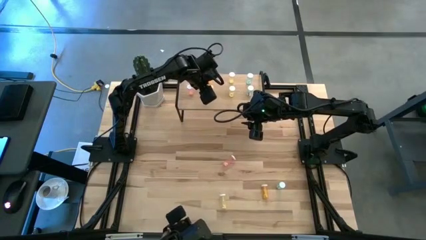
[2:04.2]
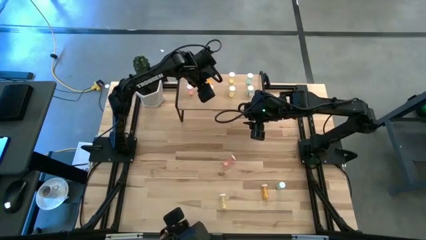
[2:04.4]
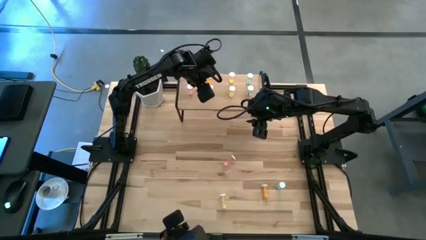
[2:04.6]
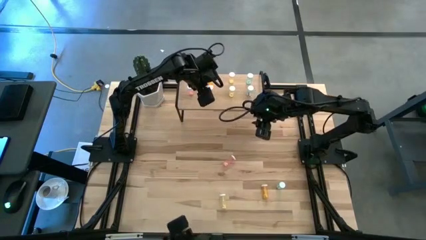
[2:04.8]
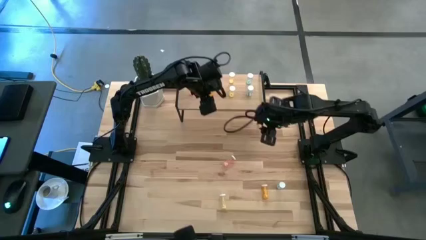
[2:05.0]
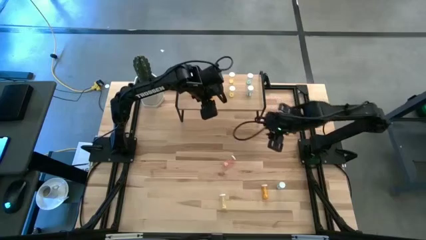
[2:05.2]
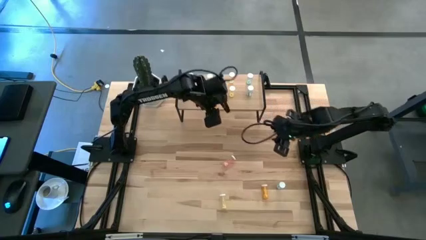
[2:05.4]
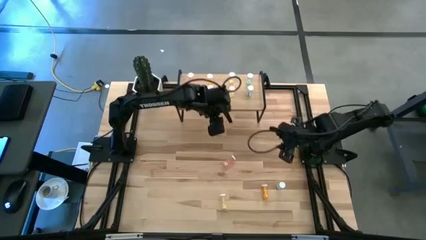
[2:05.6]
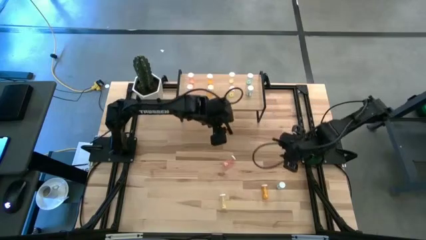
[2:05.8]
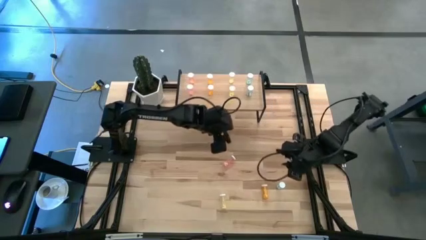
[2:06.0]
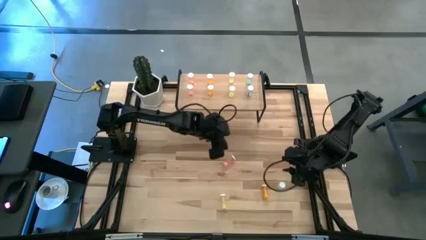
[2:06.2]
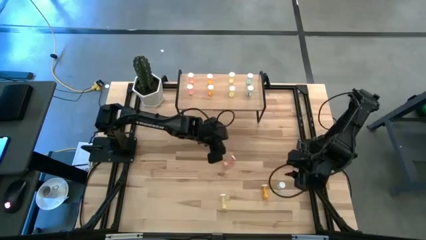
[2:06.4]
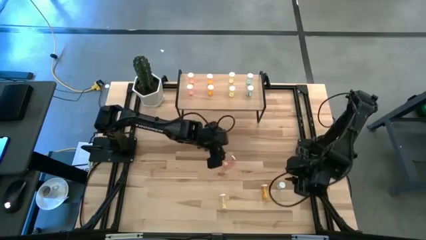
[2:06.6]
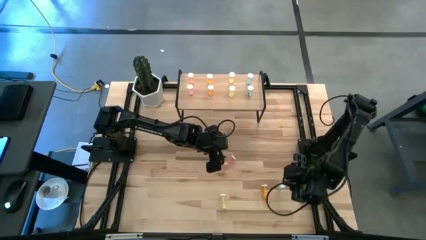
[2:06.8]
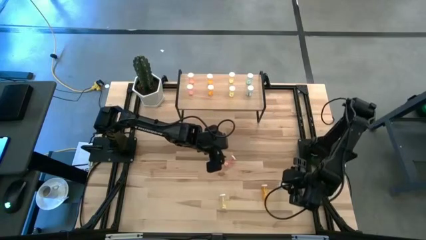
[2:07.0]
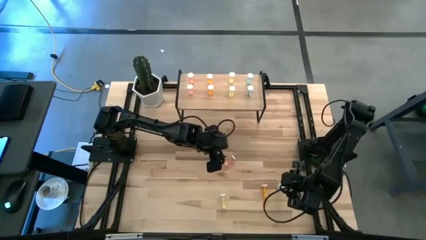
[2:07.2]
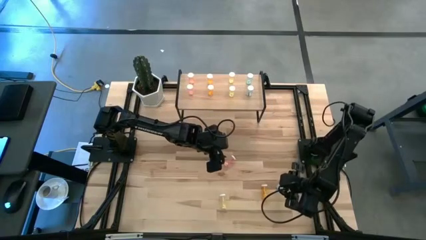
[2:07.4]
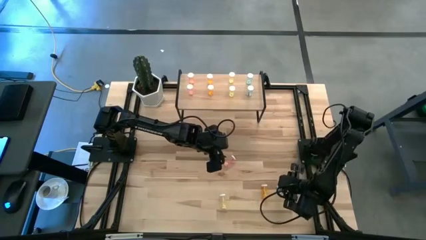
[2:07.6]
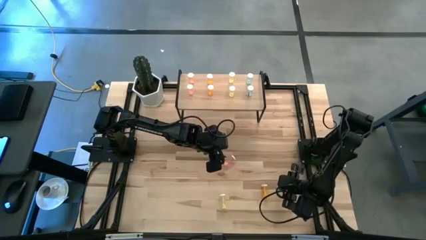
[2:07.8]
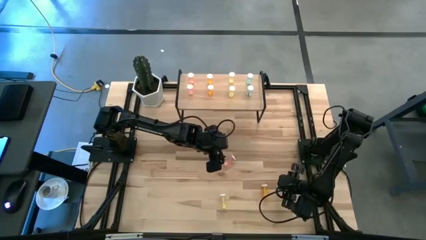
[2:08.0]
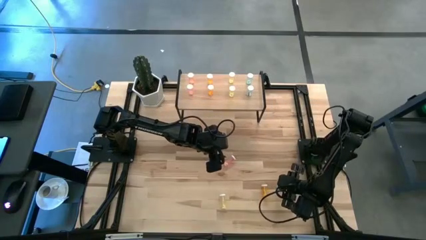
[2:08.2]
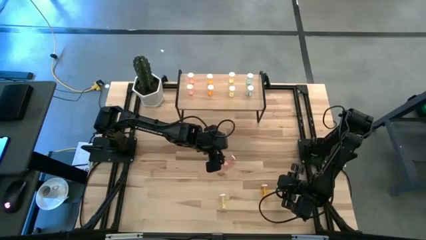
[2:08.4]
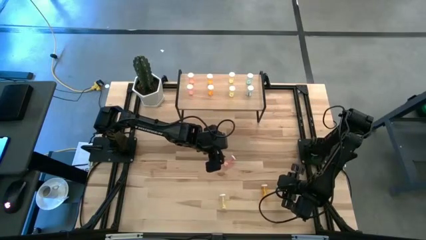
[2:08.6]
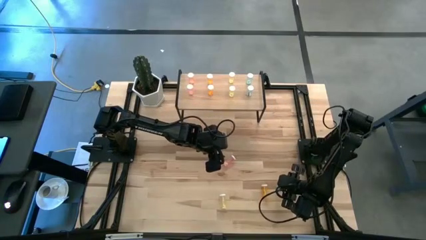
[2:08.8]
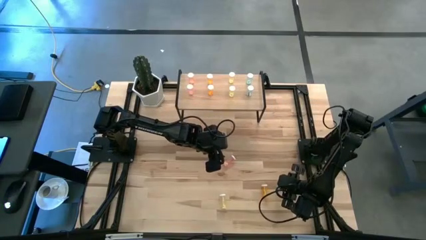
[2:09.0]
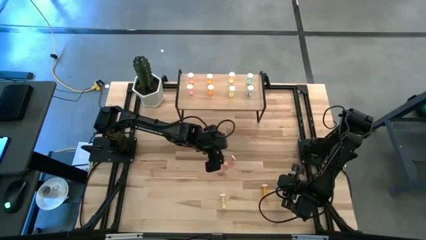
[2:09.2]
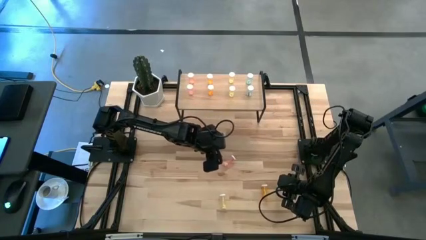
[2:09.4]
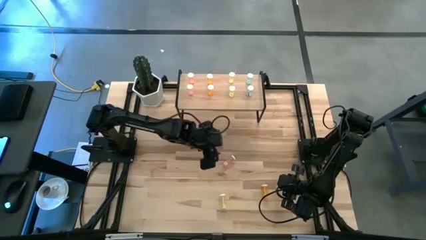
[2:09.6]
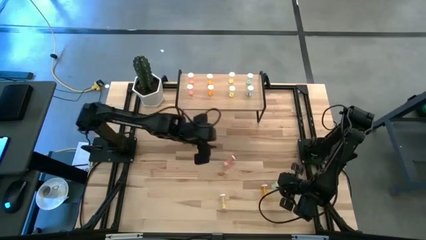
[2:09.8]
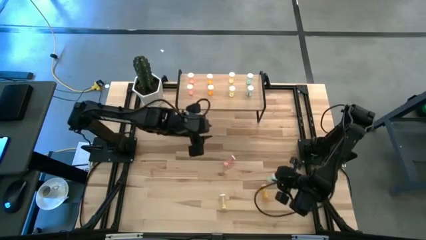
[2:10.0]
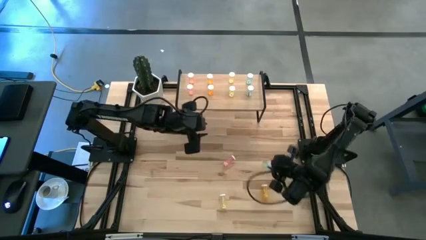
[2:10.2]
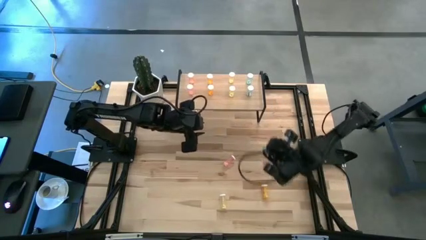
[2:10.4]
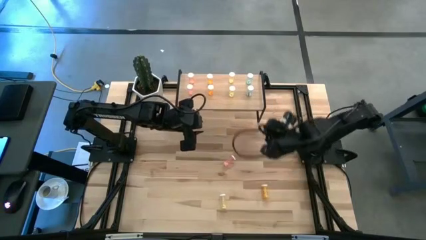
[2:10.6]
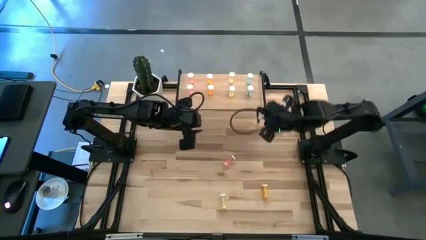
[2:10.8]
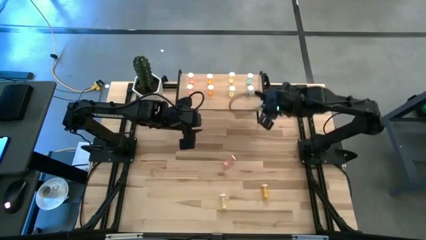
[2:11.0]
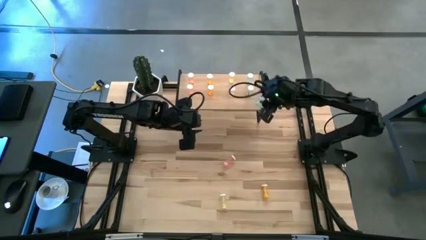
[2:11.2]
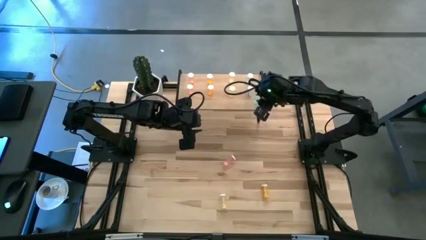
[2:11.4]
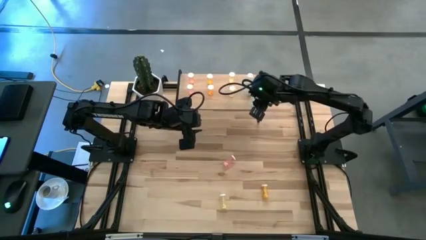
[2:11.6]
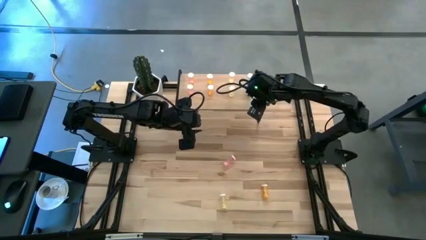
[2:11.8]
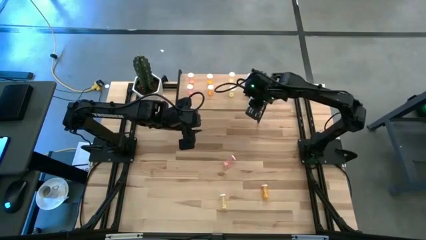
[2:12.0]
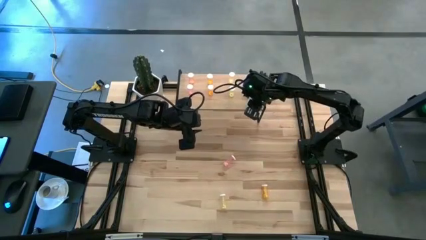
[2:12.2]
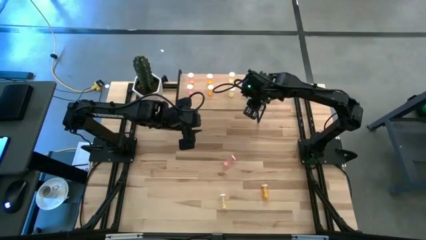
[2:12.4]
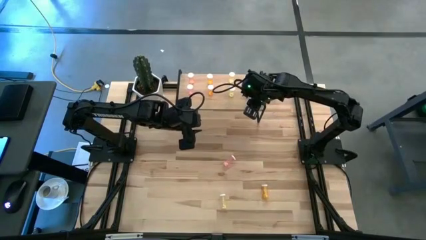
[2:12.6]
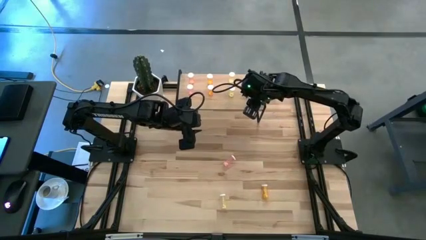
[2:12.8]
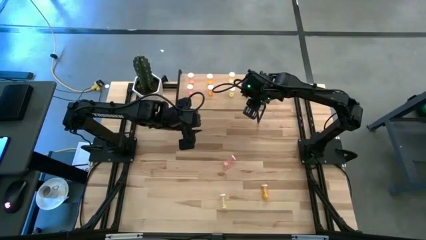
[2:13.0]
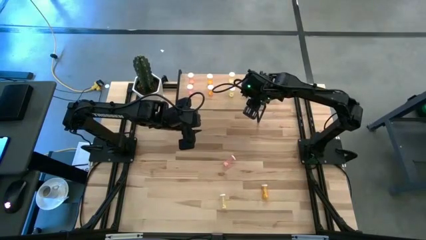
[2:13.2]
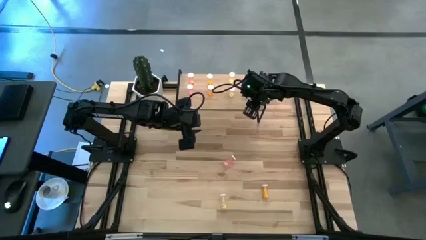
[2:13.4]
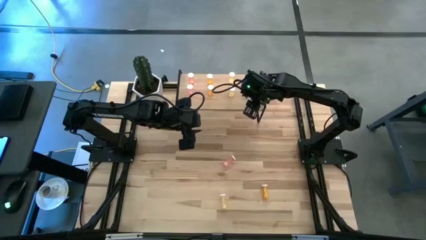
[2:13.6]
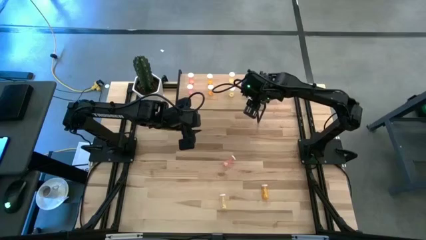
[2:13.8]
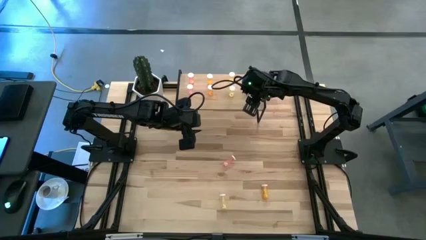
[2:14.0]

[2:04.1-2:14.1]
Task: Pick and place medicine bottles onto shelf by color
Put the blue pill bottle aligned with other blue pill bottles on the shelf

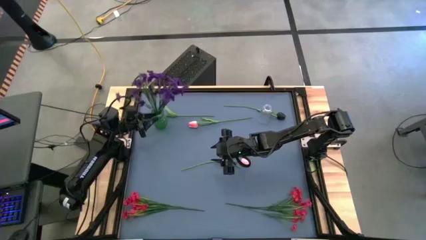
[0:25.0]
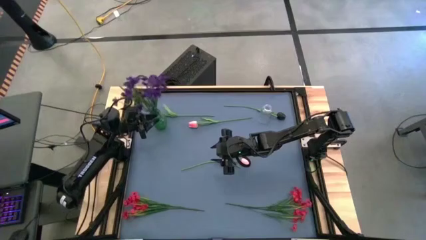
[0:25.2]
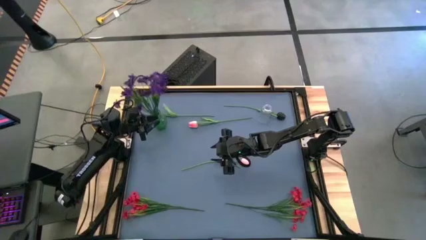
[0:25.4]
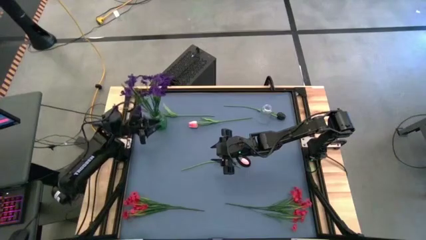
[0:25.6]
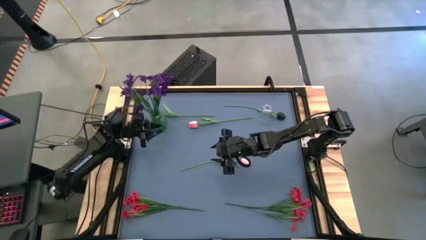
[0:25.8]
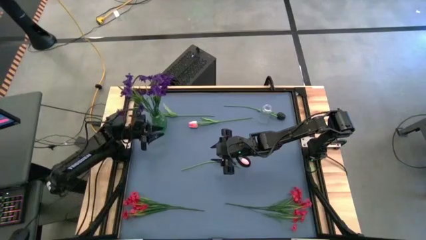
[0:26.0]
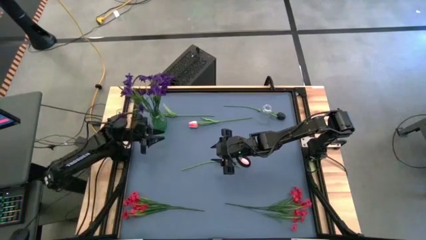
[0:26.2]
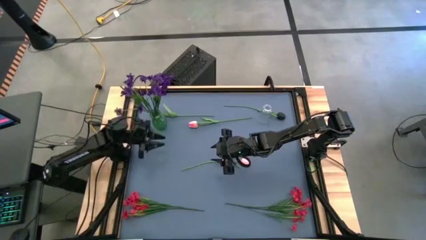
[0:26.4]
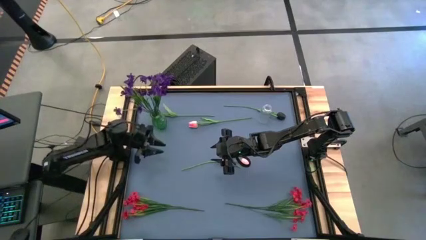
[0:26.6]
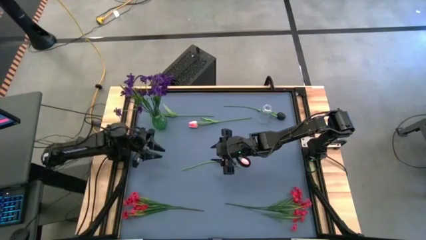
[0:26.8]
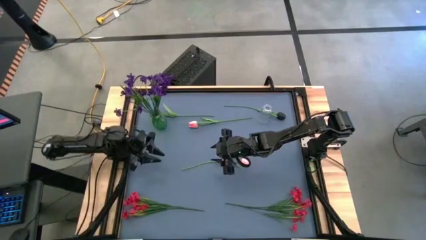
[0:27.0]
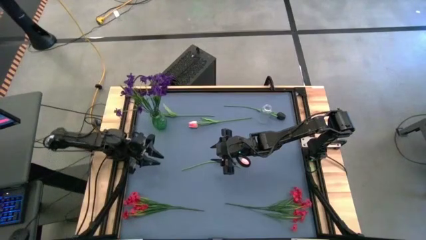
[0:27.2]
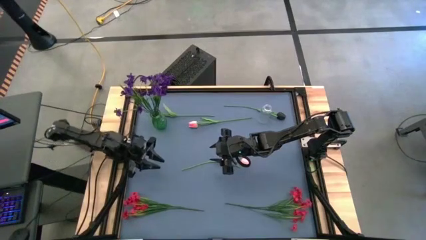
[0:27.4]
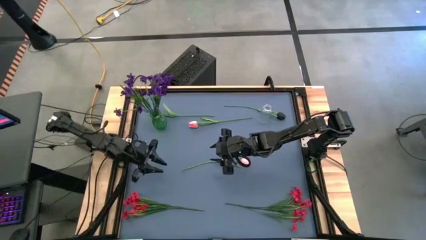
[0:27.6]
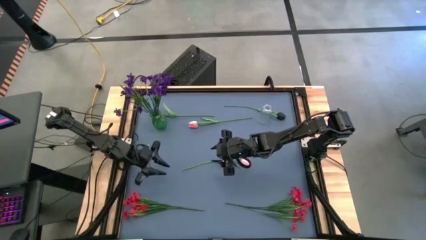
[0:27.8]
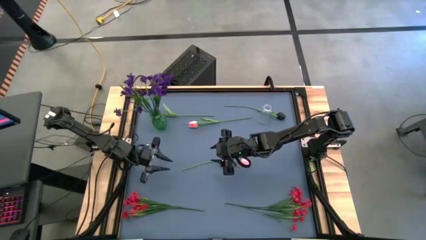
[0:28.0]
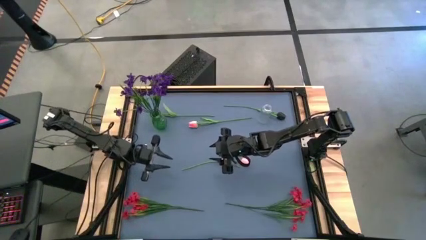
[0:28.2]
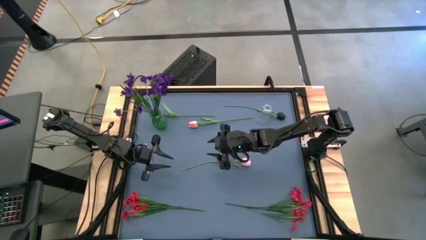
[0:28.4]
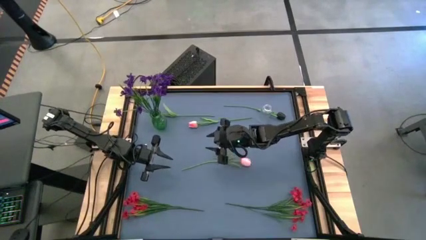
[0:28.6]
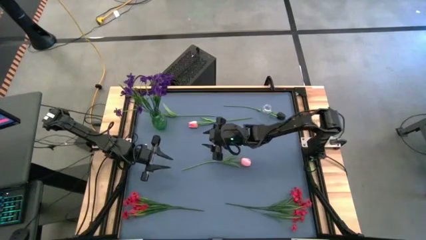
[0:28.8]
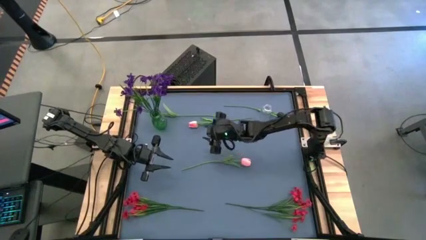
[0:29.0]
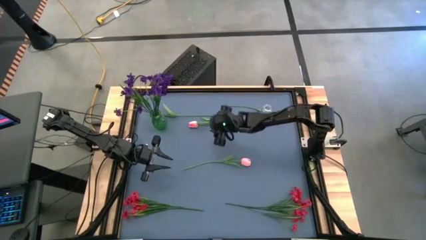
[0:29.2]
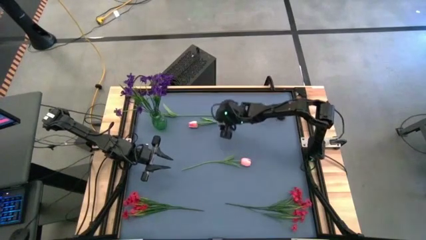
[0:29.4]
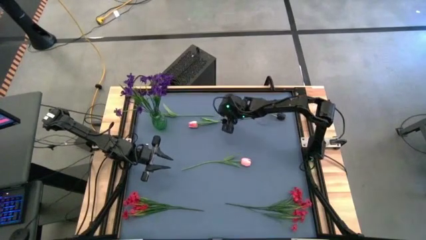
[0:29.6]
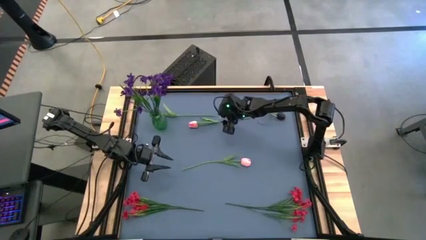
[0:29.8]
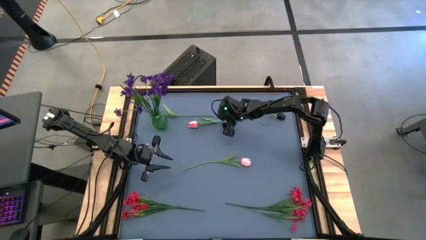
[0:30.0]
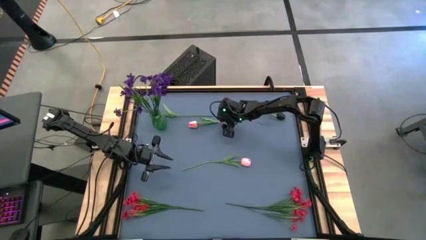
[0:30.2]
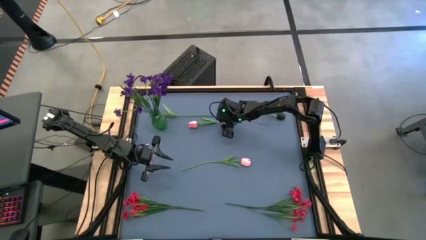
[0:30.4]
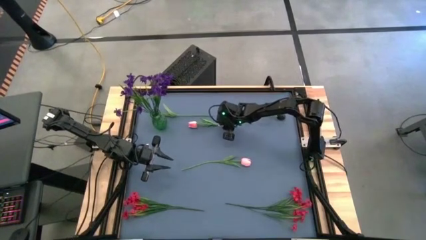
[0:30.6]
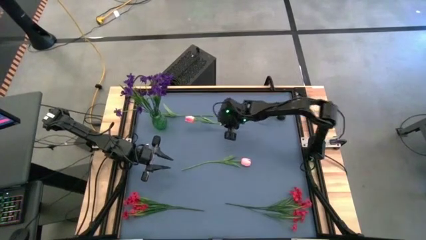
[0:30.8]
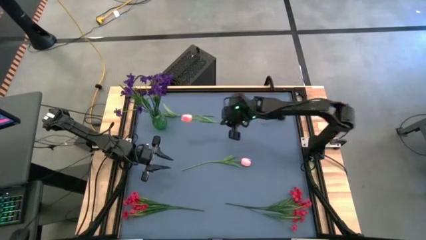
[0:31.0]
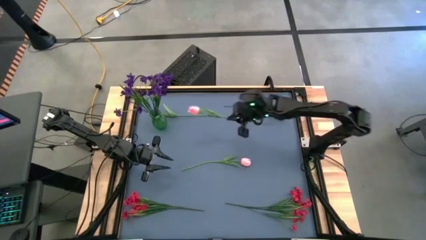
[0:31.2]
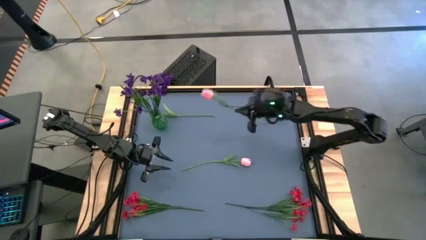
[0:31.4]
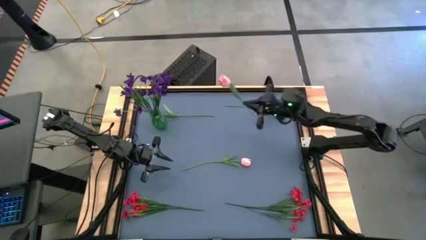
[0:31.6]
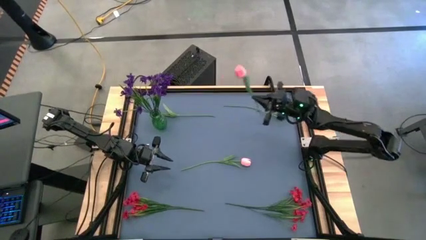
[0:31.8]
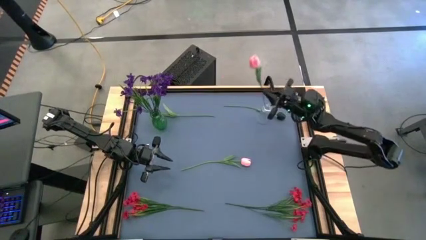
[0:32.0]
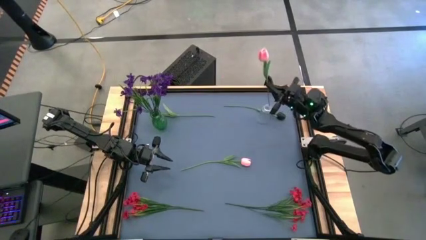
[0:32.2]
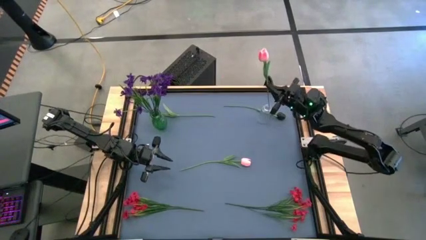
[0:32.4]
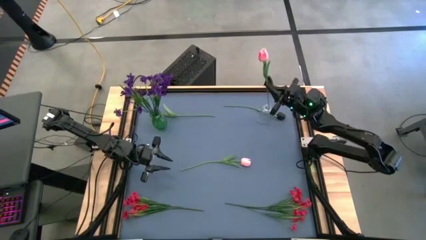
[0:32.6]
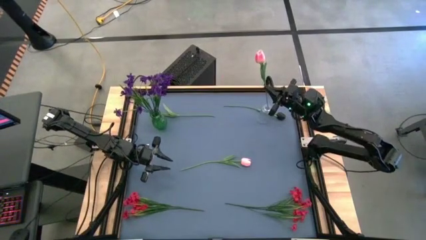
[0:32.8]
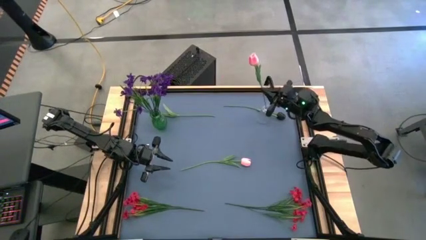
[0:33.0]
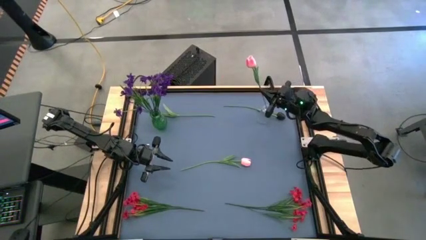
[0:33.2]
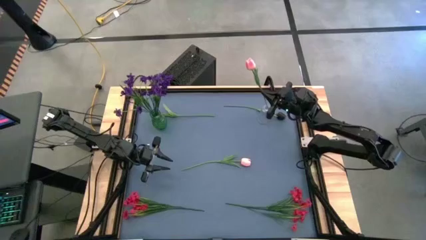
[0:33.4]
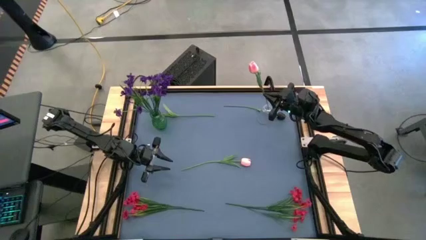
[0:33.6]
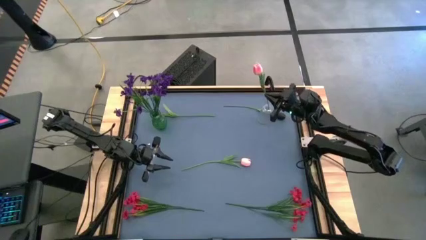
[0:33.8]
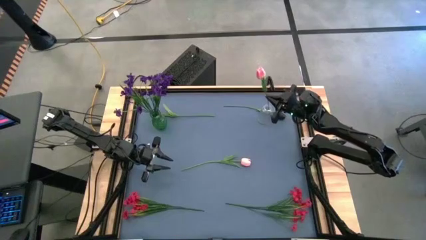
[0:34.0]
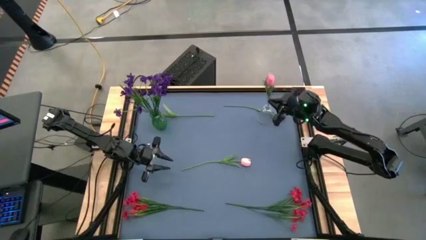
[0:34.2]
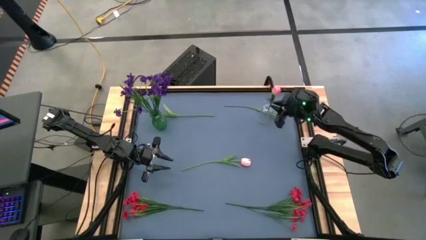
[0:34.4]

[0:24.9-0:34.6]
Task: Sort flowers into vase by color
Put the top pink flower into the transparent vase
